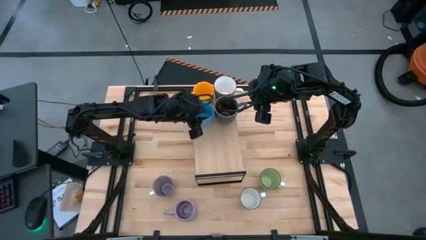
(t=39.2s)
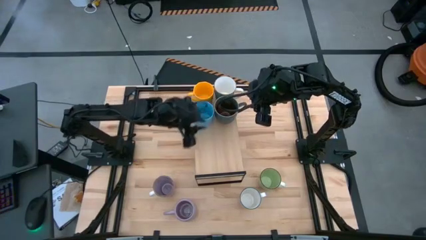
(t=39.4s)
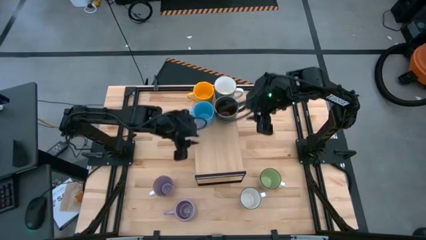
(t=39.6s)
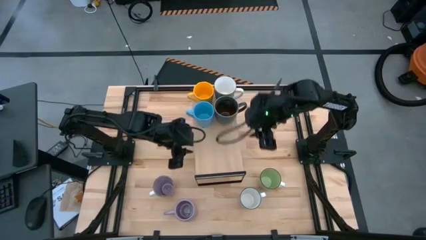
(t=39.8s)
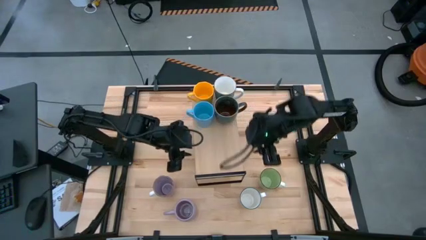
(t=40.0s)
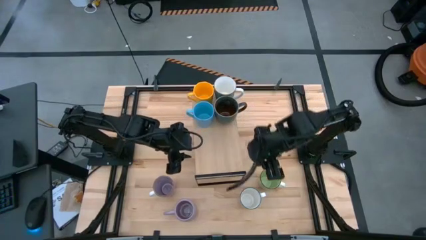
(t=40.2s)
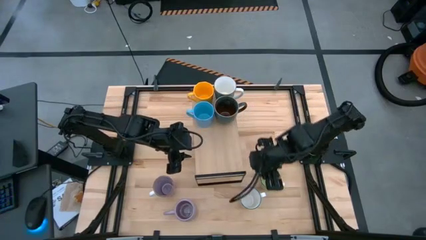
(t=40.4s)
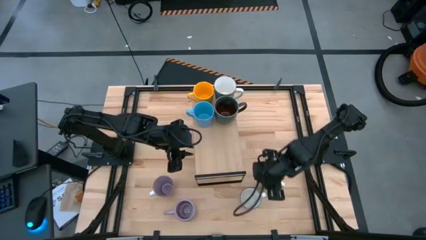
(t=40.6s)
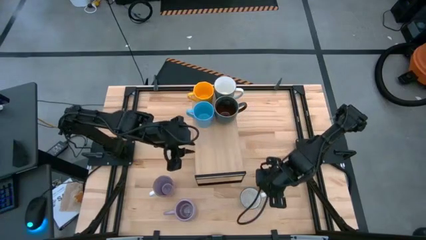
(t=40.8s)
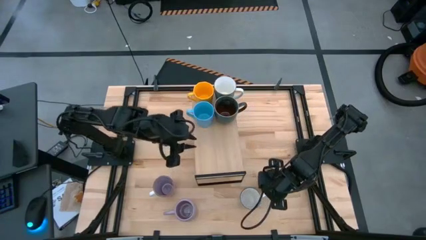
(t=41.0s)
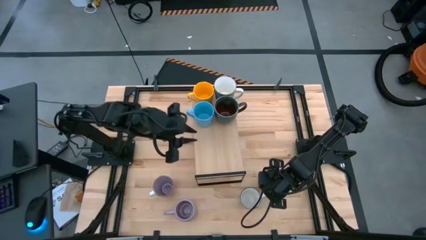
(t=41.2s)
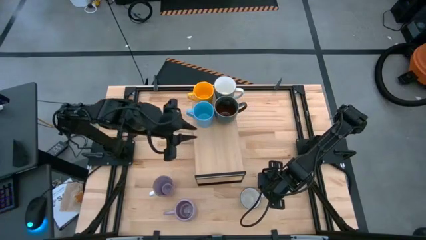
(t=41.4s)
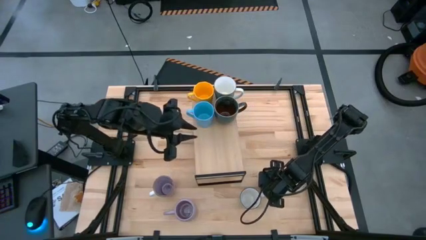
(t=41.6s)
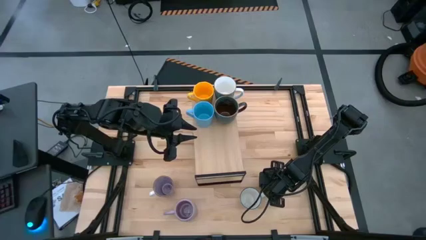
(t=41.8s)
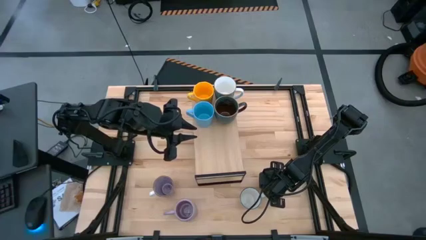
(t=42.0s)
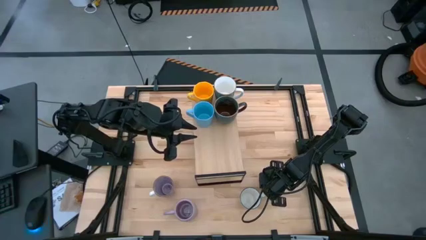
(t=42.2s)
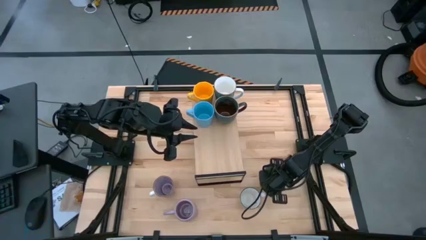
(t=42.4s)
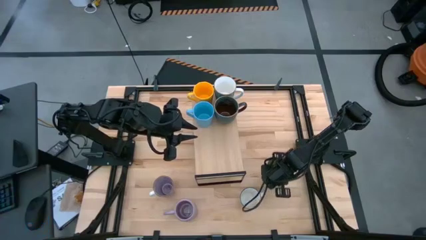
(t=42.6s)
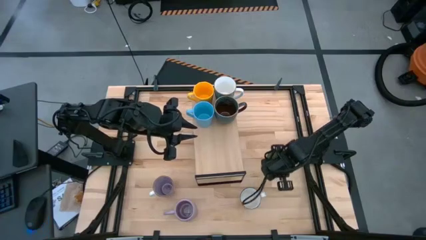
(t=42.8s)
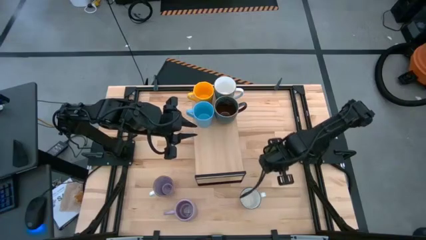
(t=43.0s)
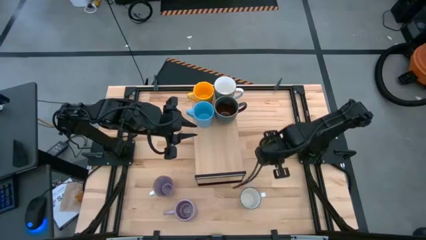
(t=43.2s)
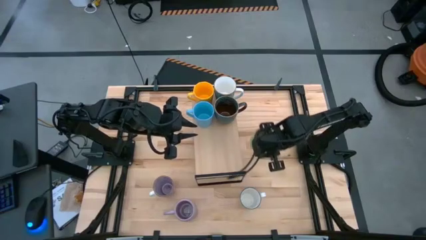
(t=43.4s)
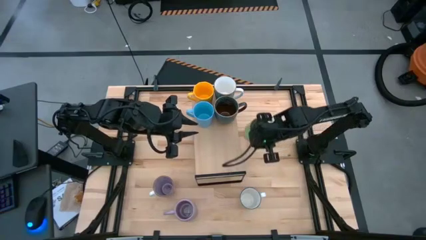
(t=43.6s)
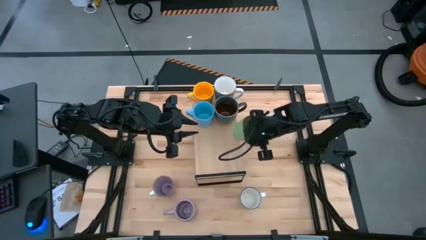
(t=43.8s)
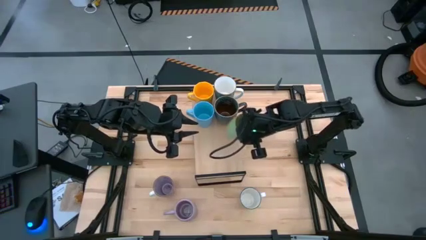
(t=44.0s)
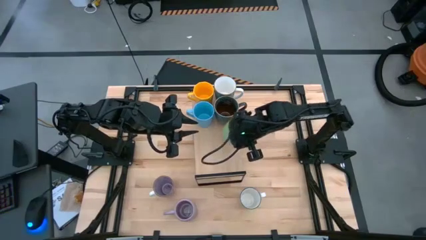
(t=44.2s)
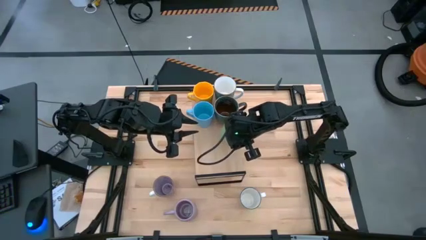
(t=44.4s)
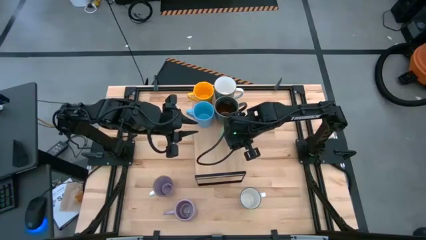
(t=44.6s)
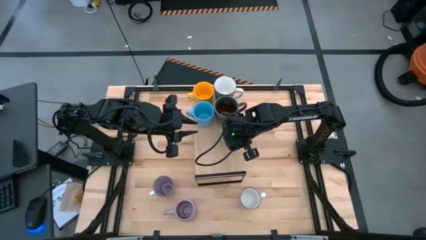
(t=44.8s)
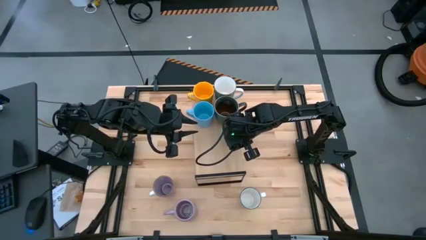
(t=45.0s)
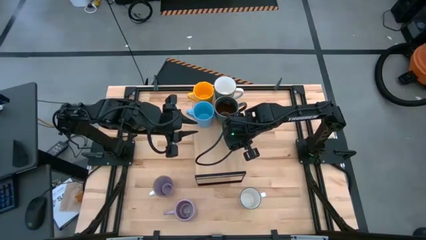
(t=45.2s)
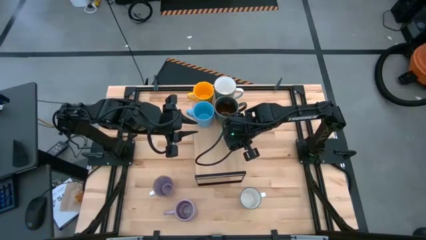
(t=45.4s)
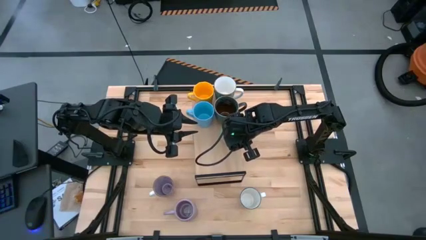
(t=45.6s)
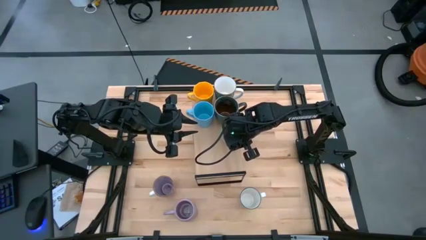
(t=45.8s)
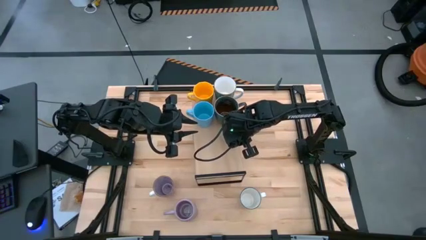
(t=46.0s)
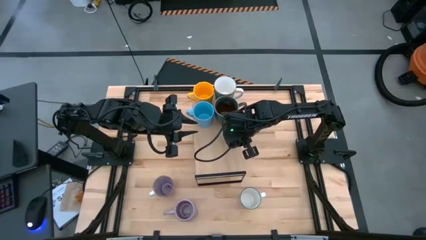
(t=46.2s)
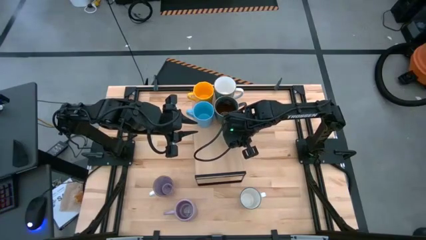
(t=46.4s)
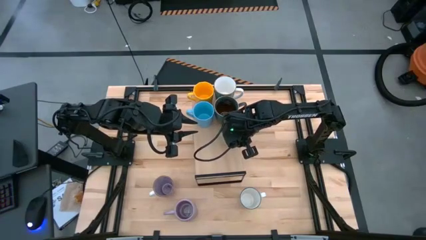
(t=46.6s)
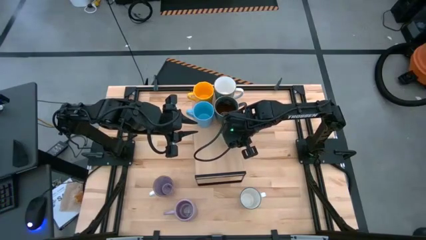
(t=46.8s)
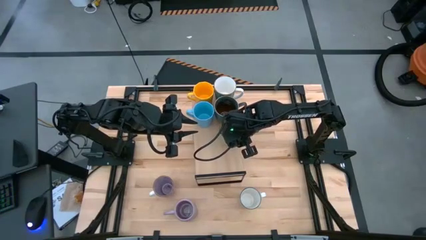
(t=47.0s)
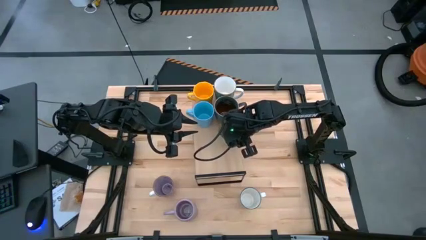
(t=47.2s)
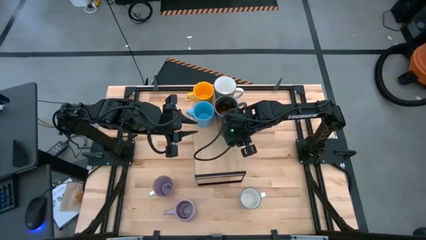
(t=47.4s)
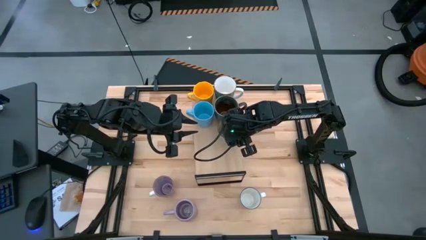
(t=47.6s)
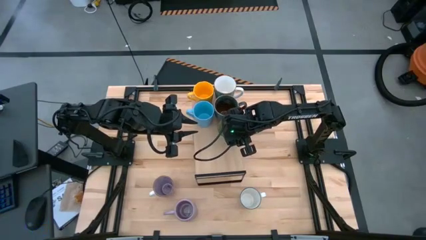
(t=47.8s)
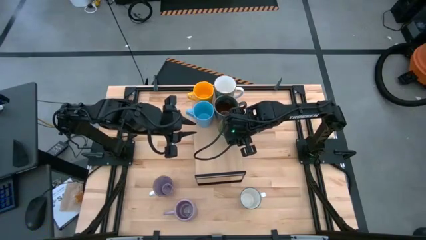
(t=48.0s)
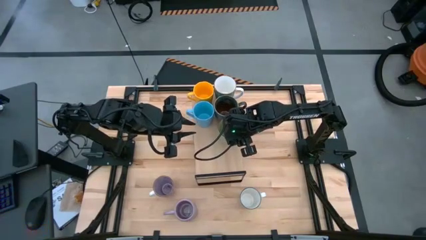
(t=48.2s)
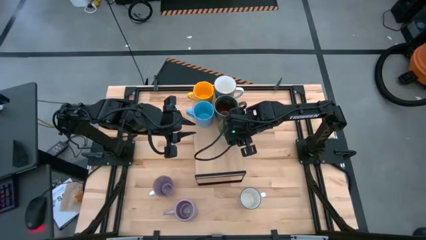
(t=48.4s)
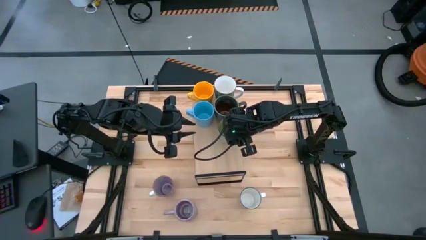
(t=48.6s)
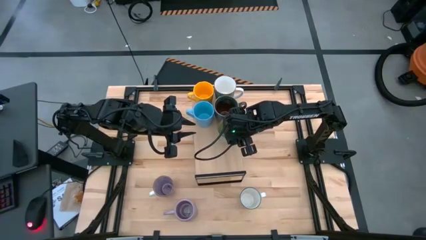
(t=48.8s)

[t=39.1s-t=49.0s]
Task: Place coffee mugs
Put the green mug on the shelf

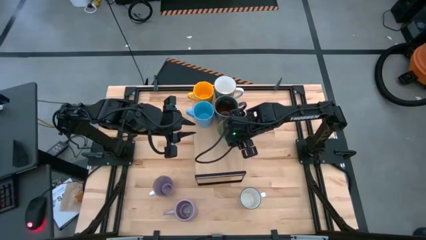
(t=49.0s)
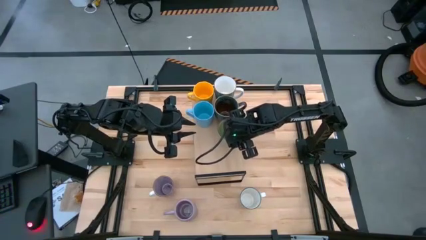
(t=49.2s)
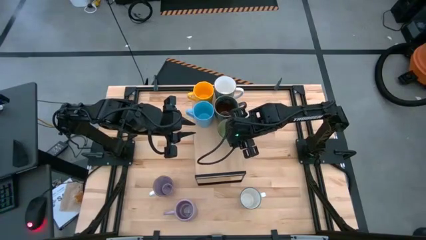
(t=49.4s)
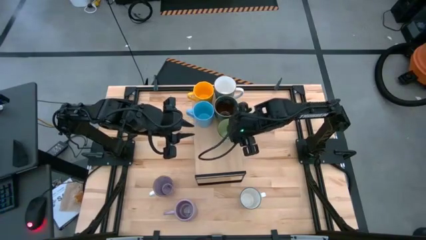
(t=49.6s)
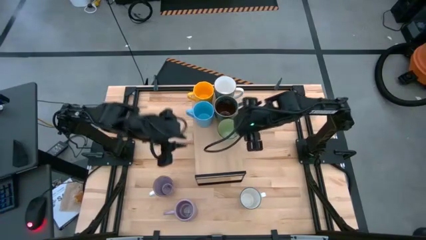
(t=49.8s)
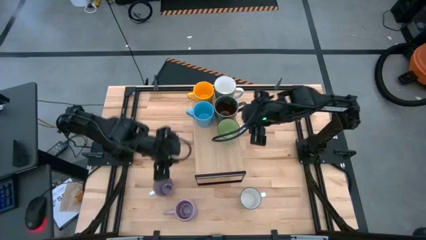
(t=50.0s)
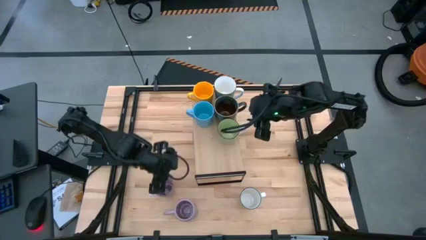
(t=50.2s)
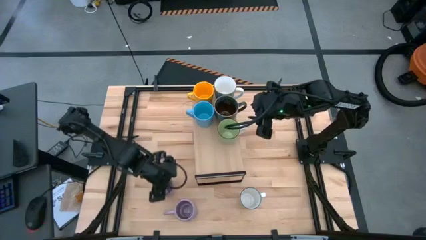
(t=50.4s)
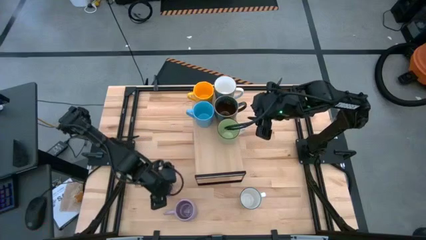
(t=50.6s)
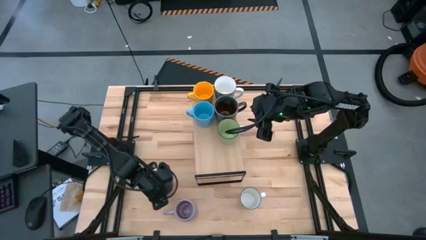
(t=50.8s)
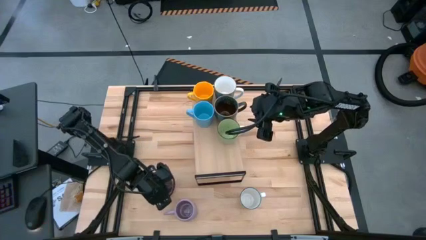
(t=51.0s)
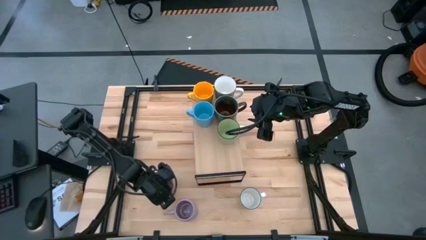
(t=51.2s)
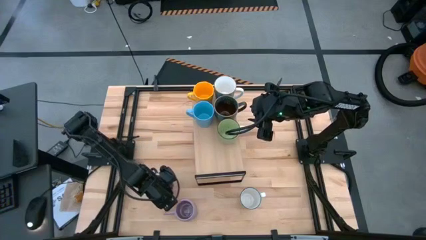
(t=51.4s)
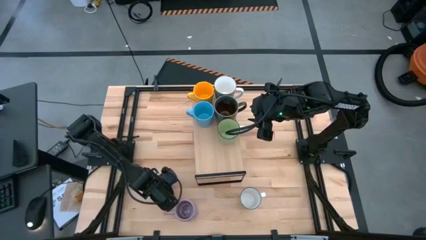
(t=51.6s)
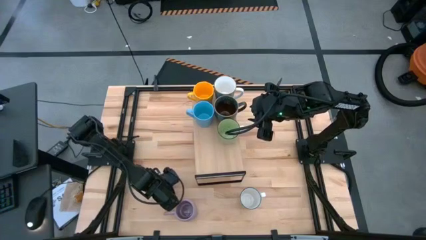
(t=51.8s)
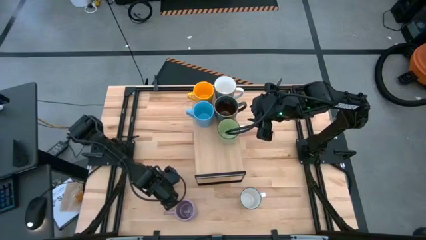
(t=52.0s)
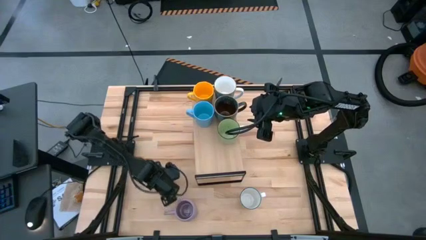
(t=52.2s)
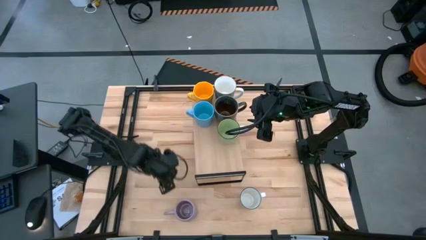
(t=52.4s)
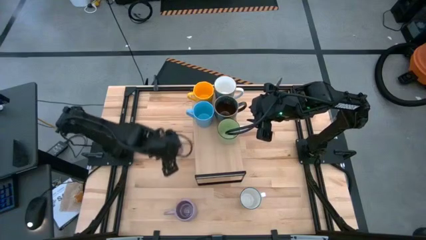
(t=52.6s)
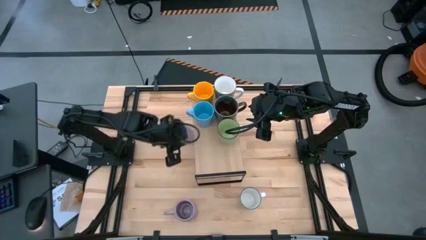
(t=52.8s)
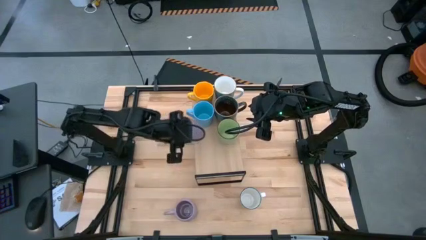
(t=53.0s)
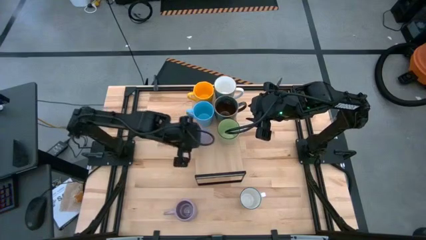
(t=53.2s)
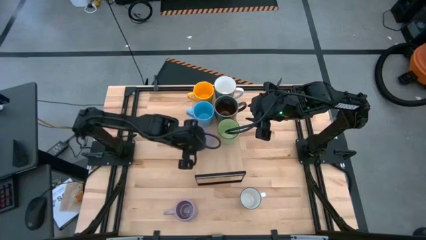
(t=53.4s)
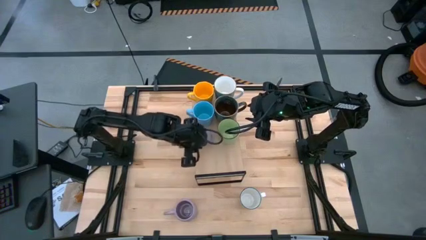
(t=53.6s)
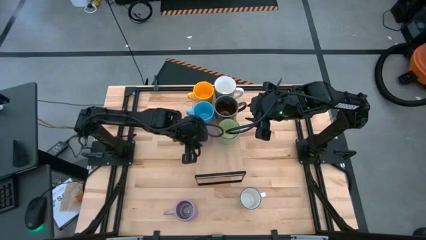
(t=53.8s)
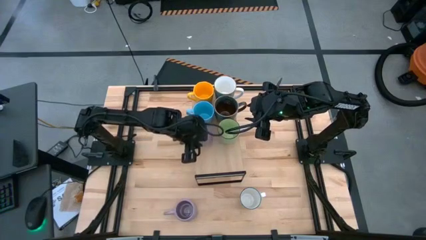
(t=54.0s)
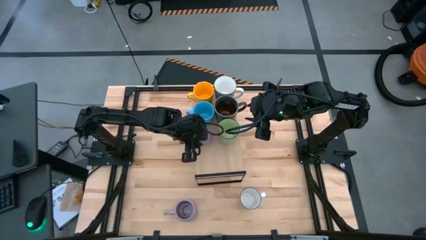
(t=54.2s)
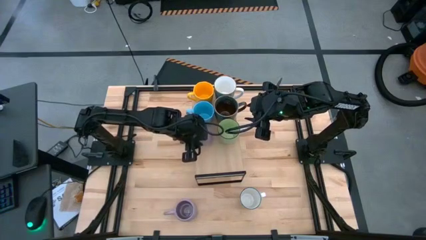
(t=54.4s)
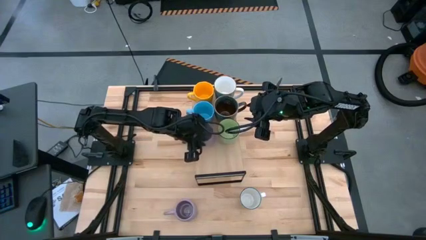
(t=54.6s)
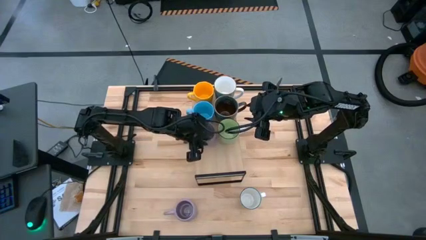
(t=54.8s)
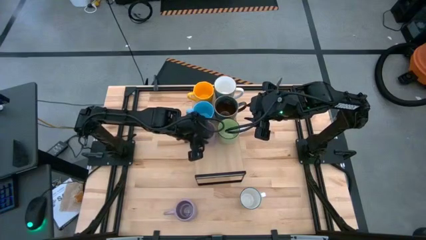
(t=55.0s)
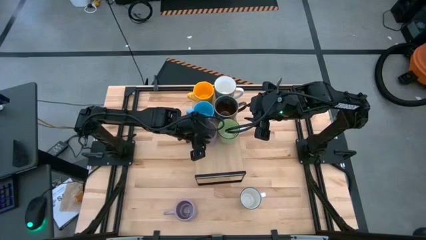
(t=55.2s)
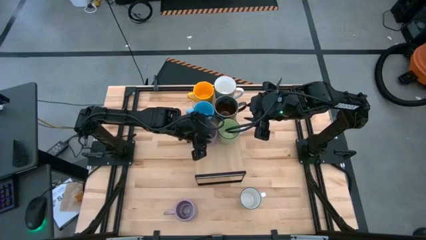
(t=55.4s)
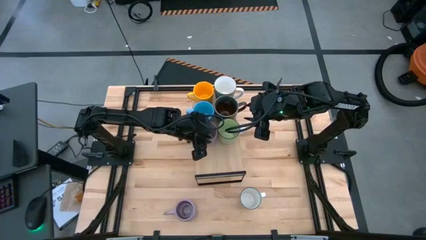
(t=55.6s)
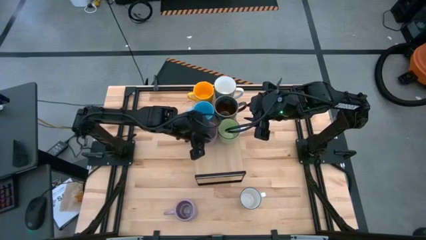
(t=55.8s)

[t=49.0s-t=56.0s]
Put the purple patterned mug on the shelf
